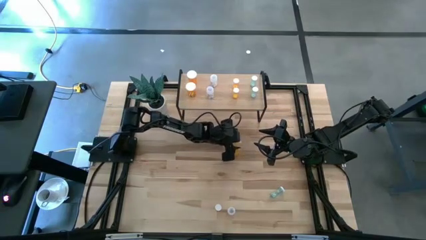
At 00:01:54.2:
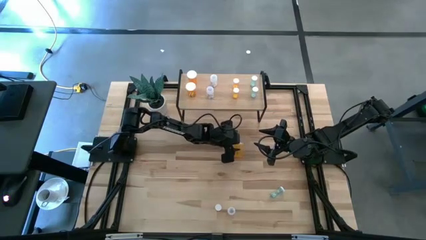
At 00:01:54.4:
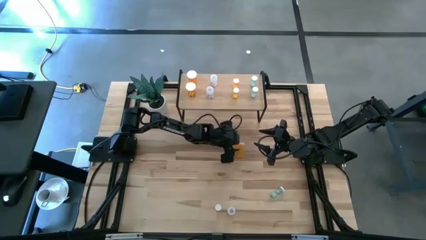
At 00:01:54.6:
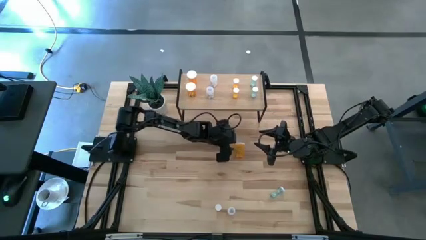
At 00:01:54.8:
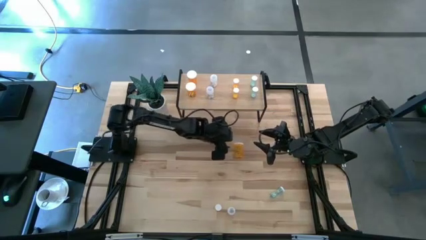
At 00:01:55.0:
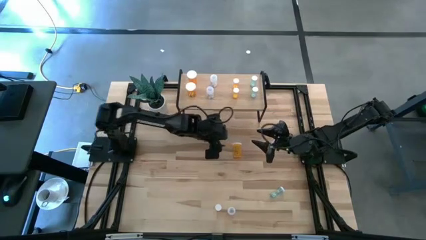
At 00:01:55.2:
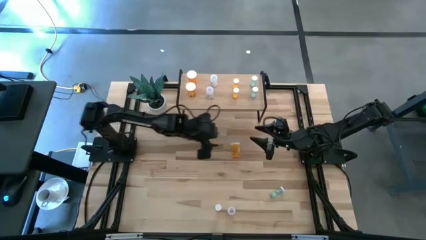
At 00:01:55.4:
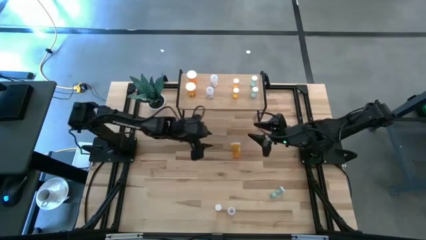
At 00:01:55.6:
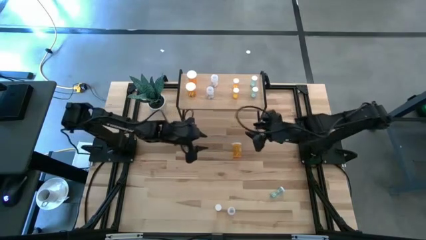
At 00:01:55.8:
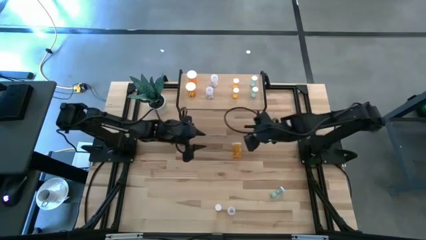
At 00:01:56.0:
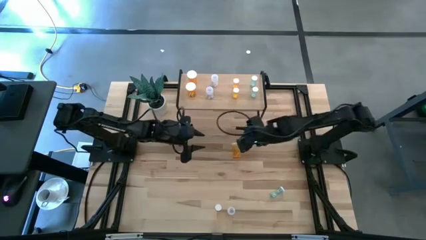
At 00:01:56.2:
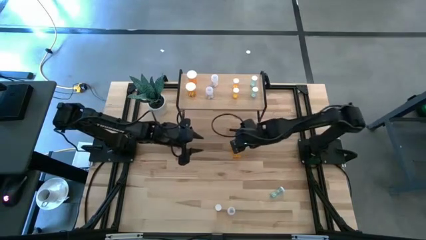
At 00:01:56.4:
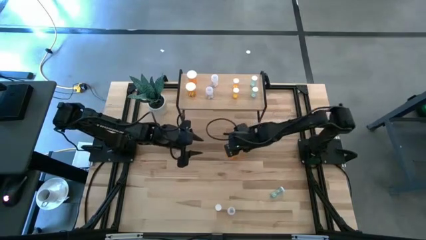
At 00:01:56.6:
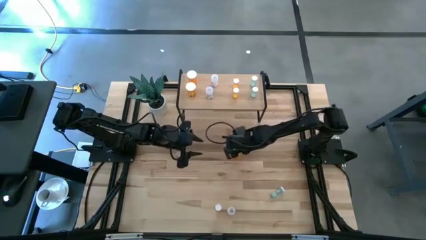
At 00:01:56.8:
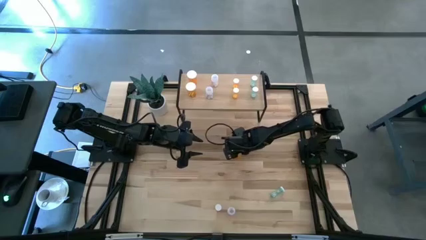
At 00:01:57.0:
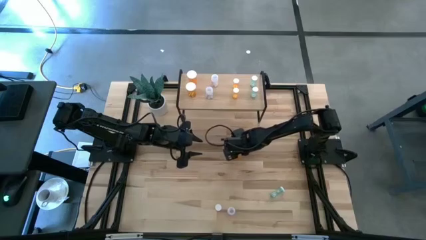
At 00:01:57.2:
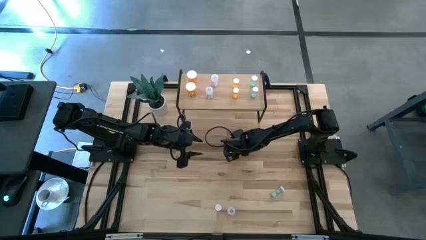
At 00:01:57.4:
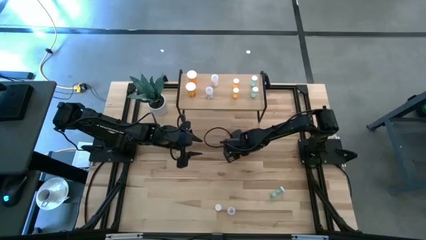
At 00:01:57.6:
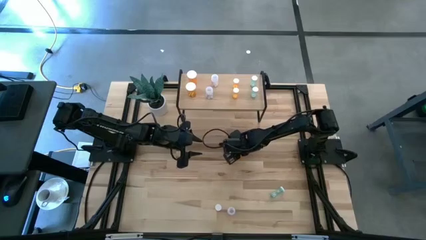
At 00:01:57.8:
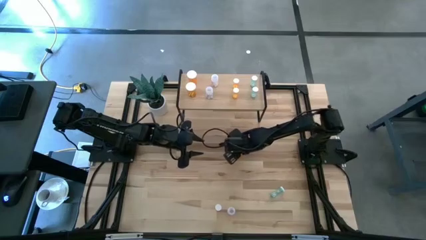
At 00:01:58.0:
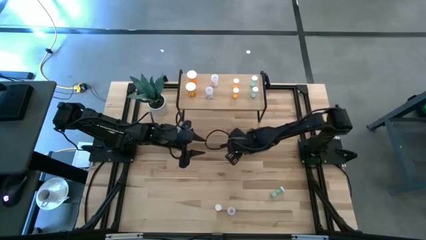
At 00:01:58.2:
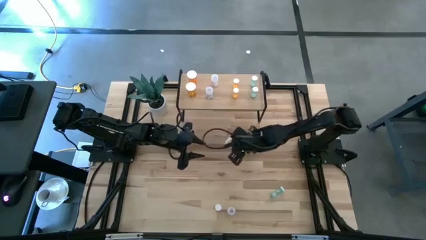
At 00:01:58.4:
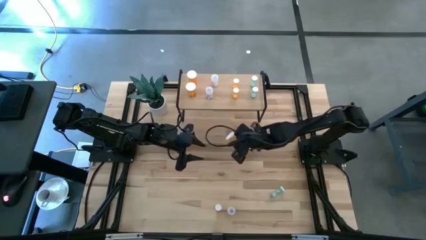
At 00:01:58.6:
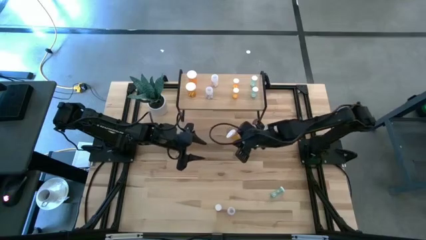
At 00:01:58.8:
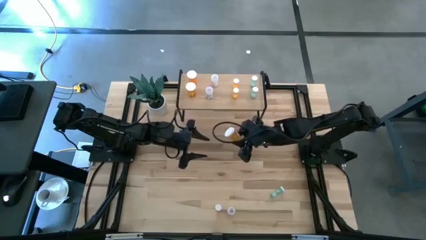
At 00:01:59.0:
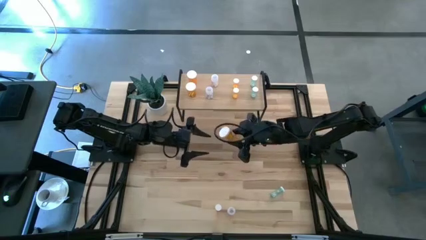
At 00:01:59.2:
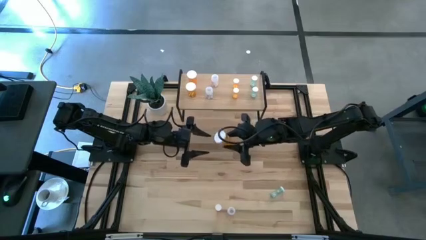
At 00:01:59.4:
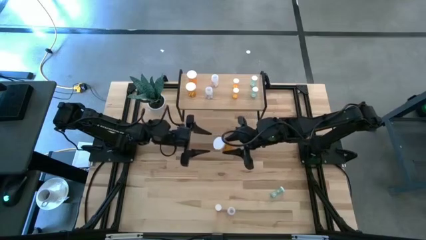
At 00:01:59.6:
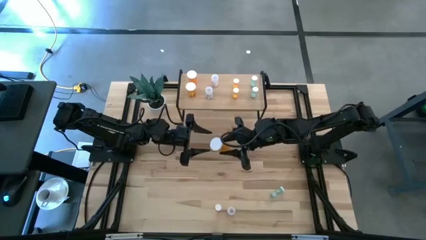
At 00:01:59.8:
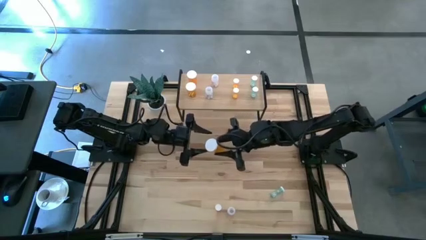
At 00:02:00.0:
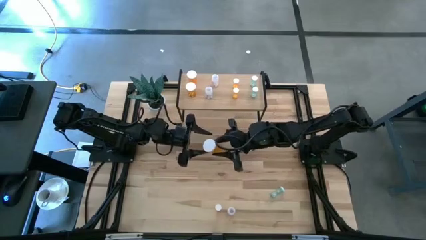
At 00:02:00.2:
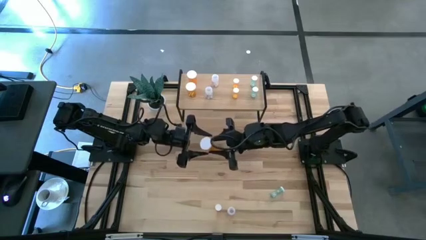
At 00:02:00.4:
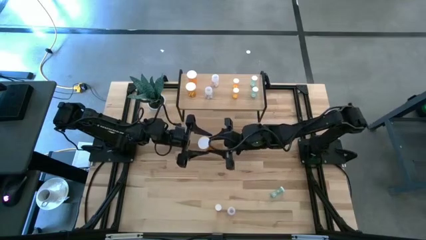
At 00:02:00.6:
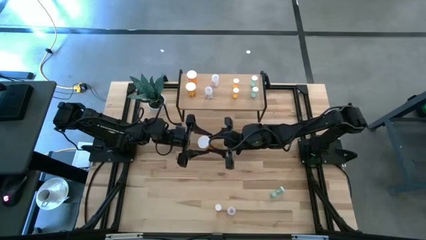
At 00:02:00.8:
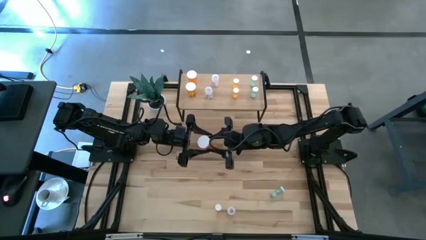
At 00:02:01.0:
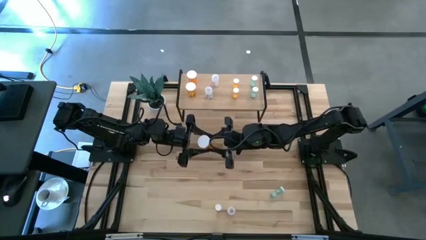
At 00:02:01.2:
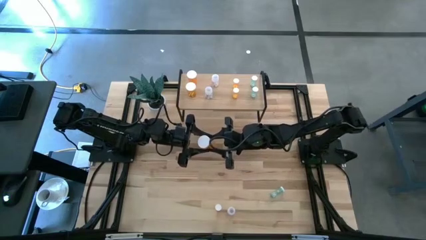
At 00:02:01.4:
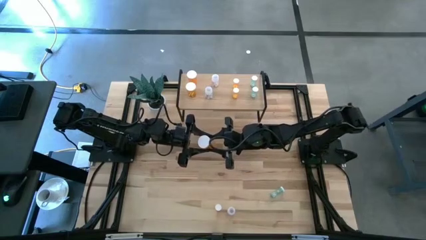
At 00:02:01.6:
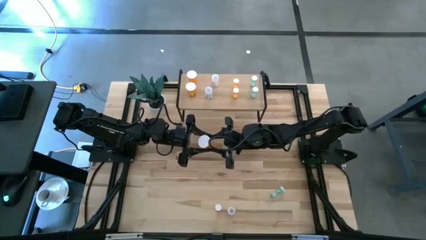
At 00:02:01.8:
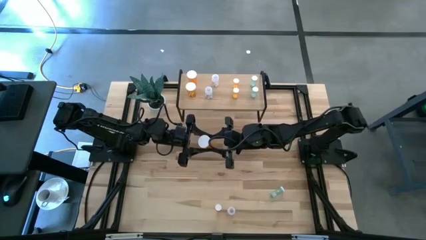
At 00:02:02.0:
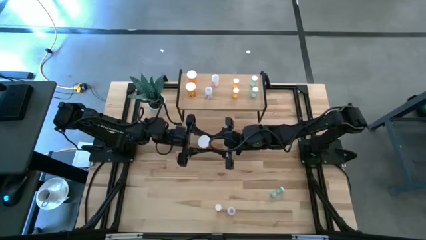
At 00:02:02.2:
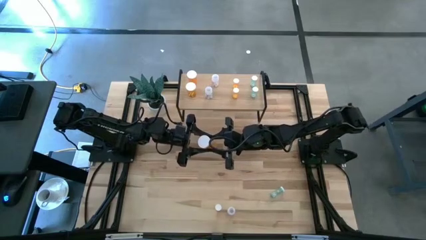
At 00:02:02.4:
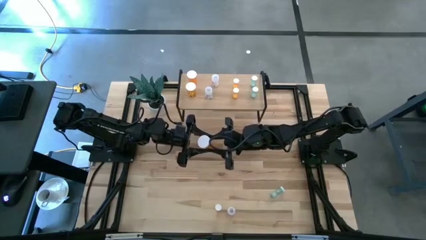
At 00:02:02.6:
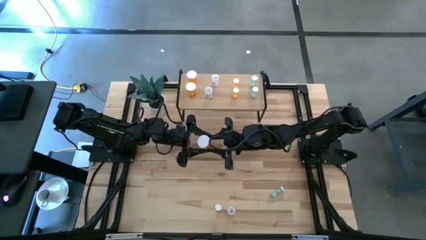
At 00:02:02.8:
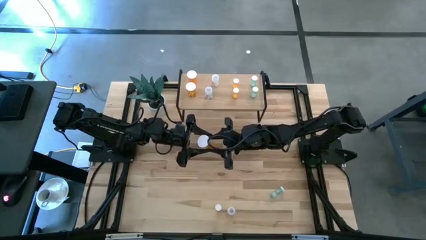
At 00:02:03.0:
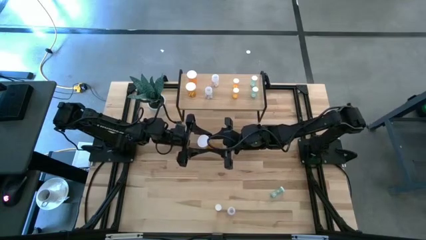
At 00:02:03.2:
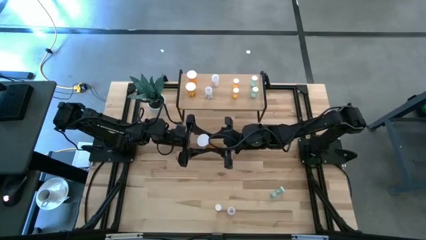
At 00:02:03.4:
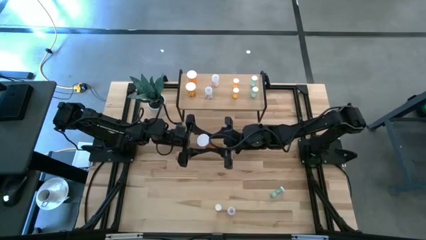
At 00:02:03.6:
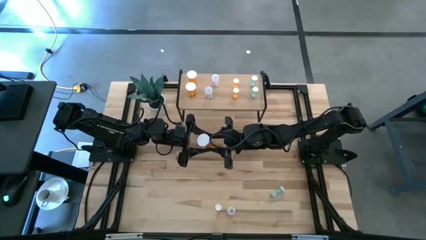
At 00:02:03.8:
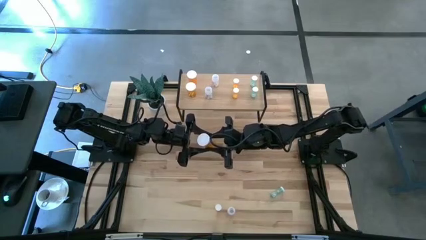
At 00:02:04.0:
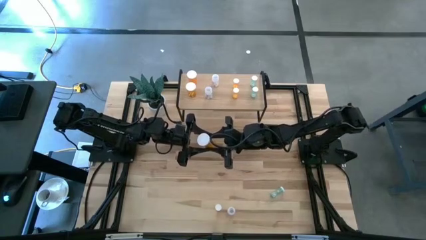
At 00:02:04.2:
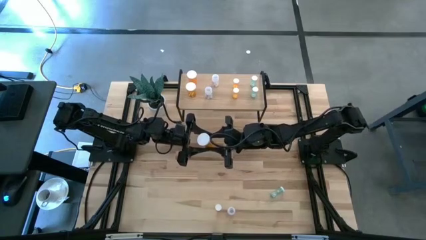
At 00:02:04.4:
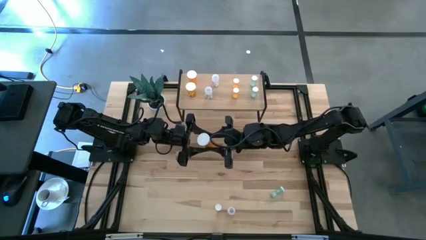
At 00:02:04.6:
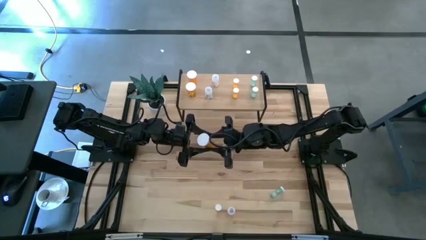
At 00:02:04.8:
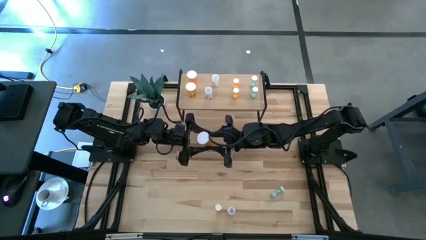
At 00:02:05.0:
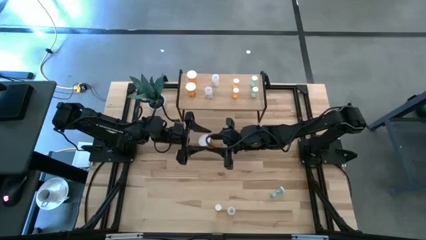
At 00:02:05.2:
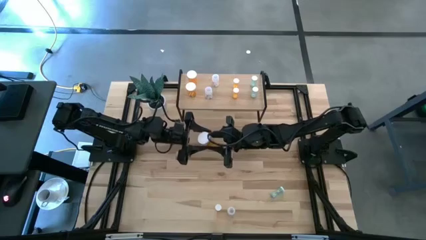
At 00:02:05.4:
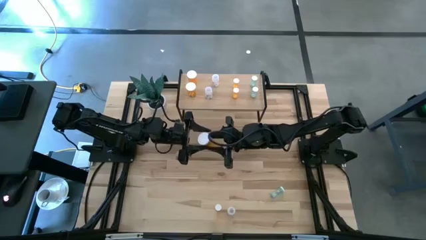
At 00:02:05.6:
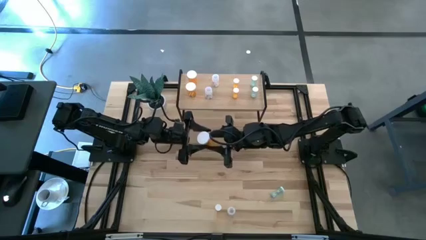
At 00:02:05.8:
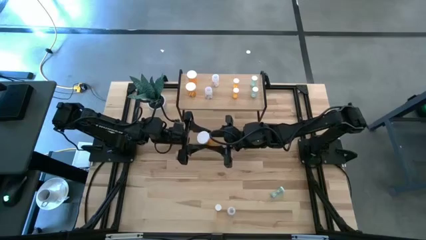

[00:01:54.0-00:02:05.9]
Task: Pick and place medicine bottles onto shelf by color
Put the large orange pill bottle aligned with the other large orange pill bottles on the shelf
